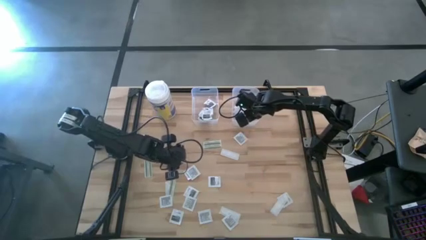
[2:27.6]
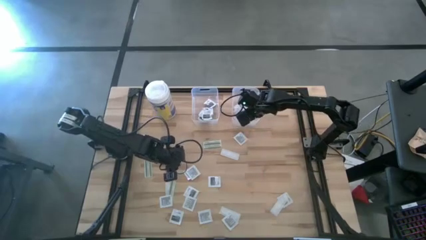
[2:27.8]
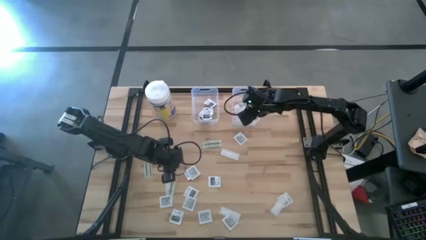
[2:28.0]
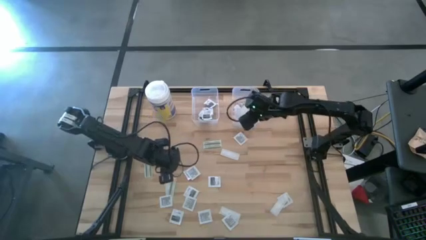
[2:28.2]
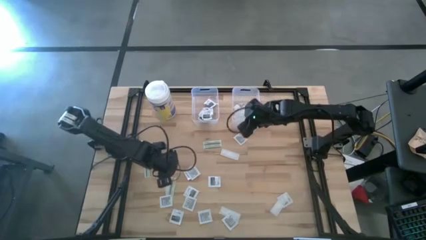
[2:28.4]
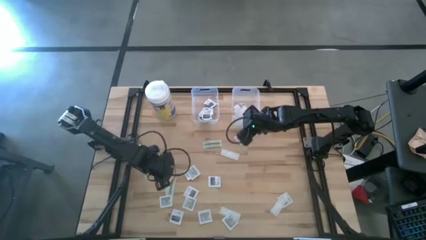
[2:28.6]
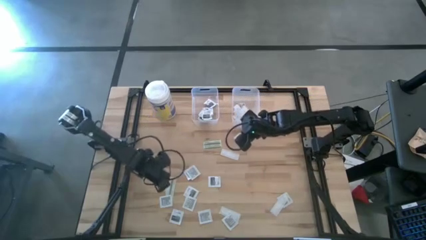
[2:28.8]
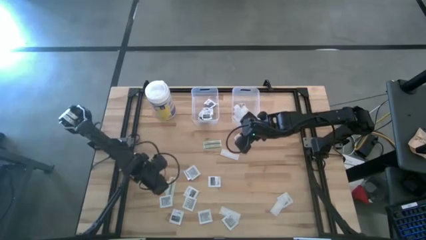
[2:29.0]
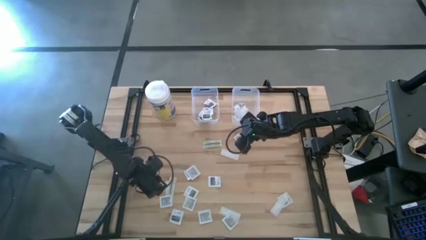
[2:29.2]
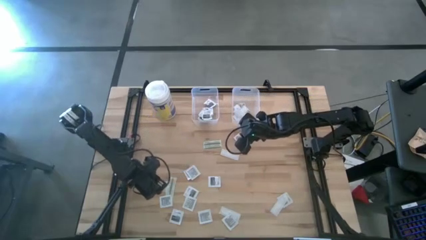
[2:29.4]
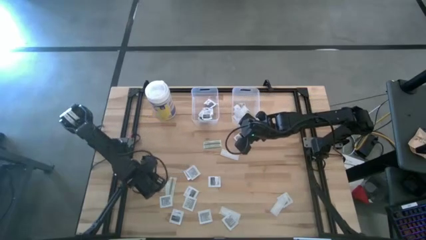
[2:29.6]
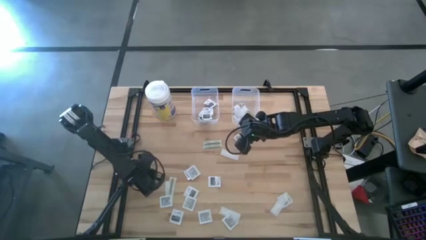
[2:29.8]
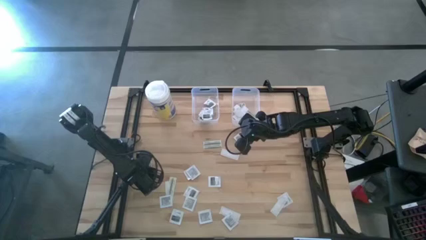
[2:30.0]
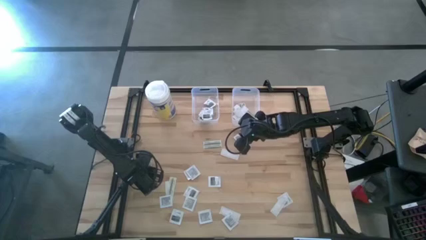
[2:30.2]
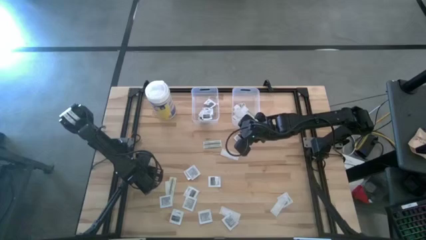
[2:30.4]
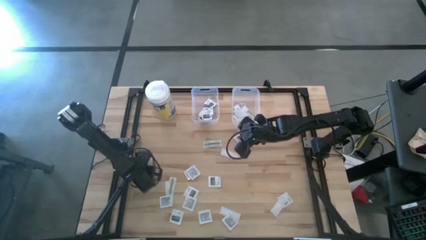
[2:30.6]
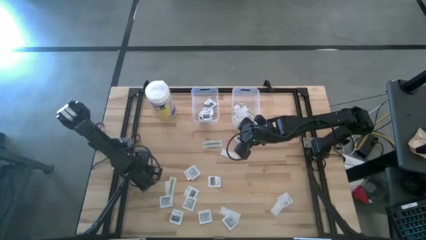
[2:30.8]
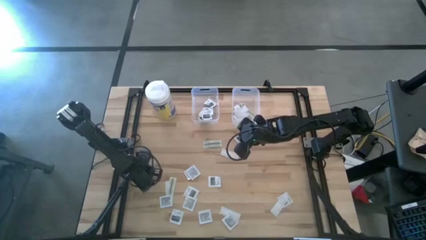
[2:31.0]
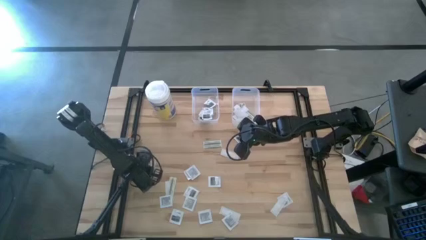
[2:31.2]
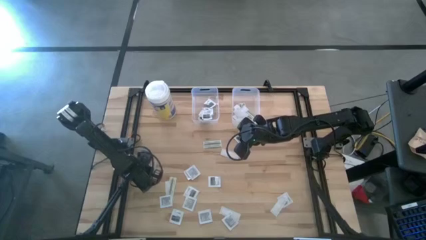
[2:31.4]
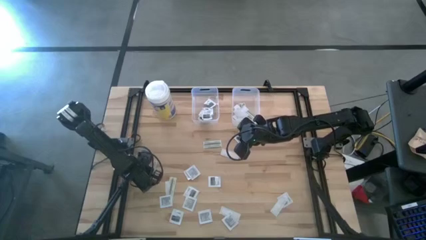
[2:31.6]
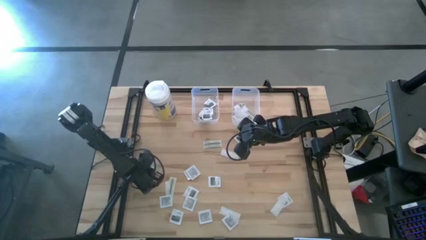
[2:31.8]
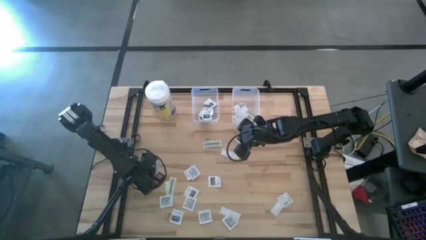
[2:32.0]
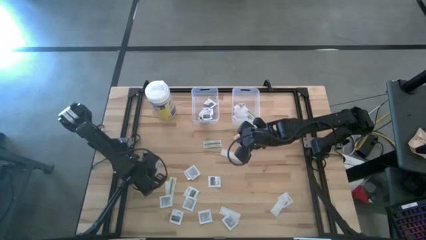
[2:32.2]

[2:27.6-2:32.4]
Task: Pick & Place First Aid Supplies
Put the bandage into the right transparent bin

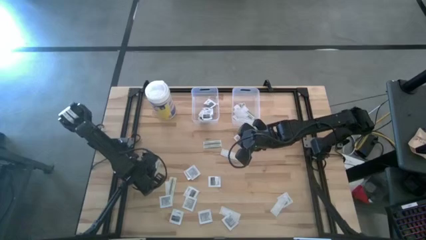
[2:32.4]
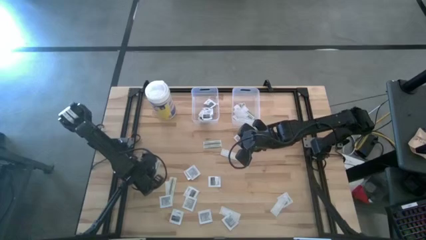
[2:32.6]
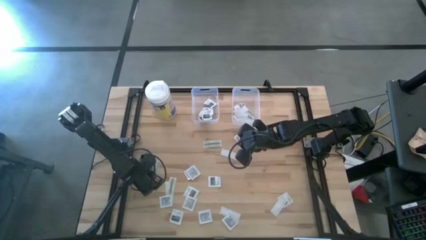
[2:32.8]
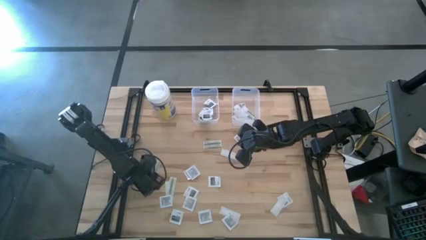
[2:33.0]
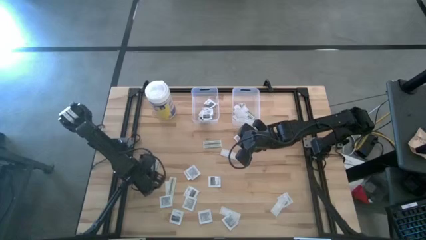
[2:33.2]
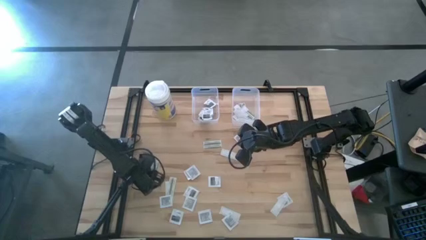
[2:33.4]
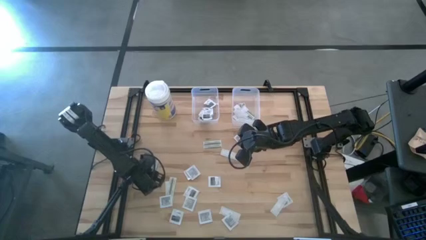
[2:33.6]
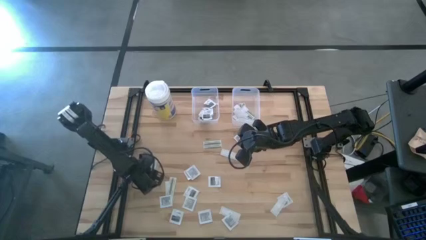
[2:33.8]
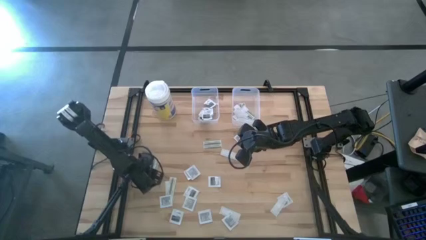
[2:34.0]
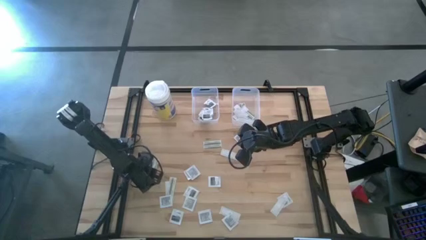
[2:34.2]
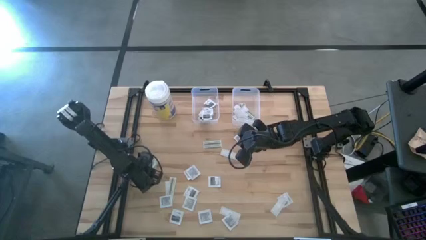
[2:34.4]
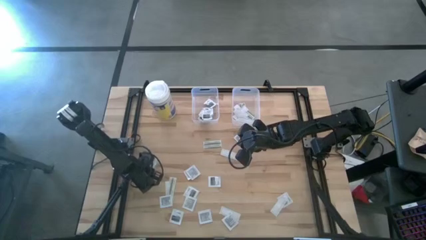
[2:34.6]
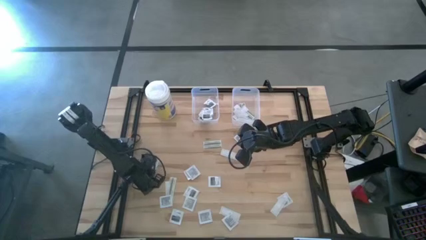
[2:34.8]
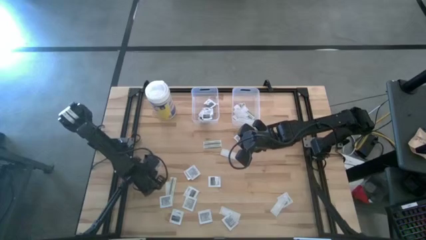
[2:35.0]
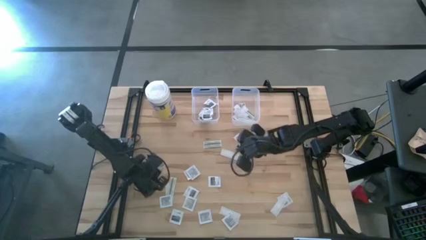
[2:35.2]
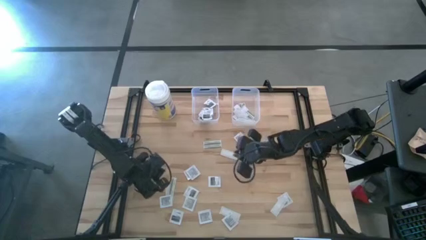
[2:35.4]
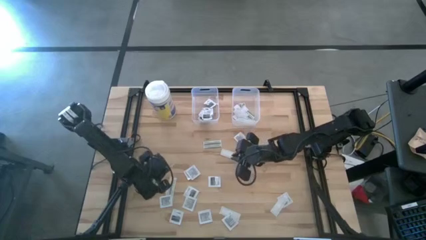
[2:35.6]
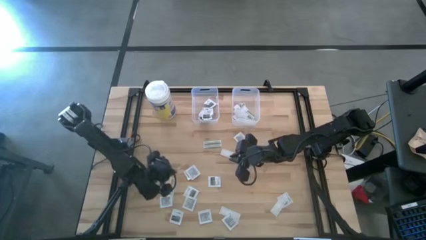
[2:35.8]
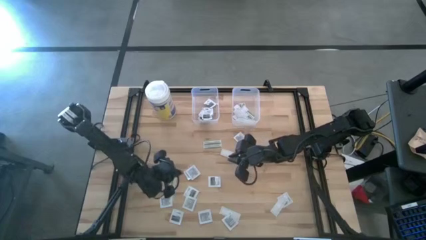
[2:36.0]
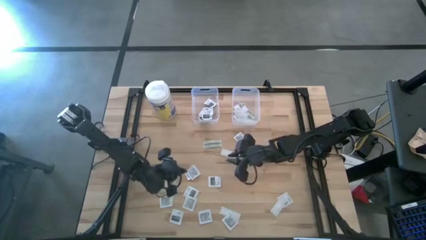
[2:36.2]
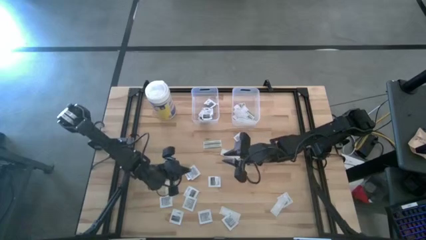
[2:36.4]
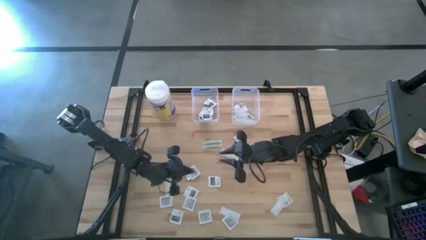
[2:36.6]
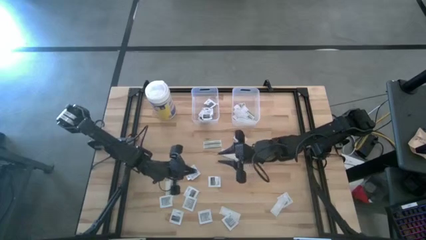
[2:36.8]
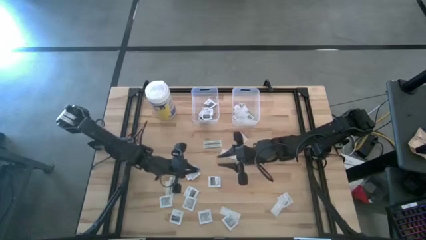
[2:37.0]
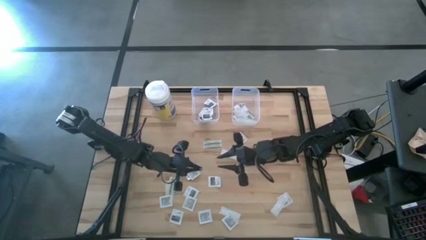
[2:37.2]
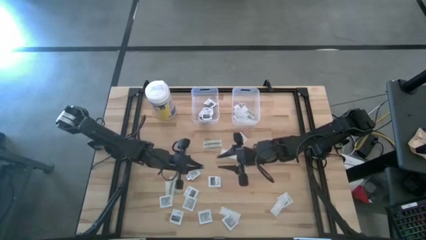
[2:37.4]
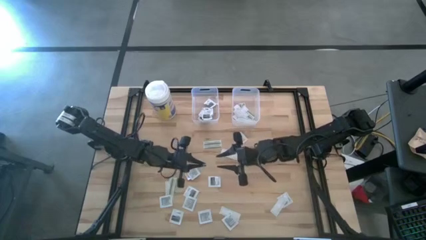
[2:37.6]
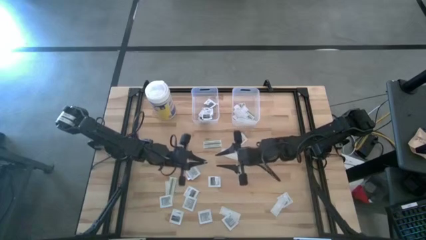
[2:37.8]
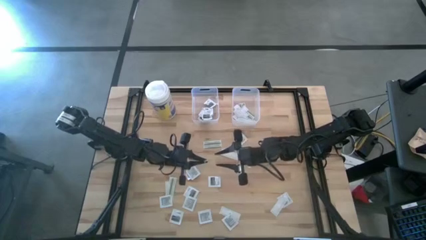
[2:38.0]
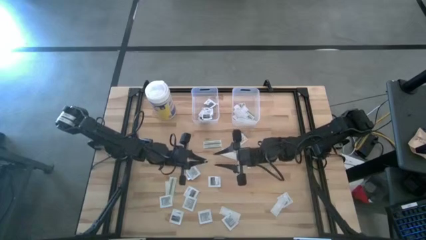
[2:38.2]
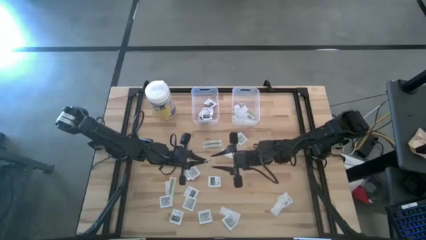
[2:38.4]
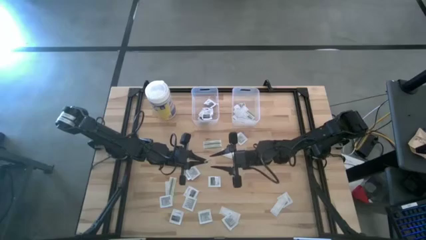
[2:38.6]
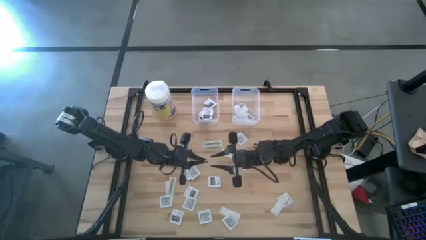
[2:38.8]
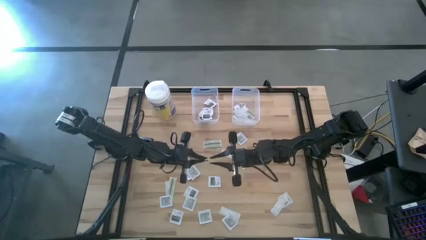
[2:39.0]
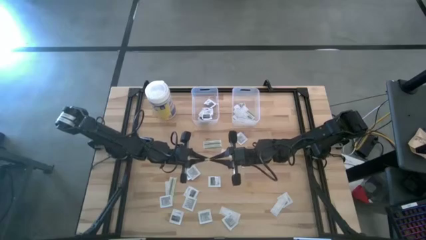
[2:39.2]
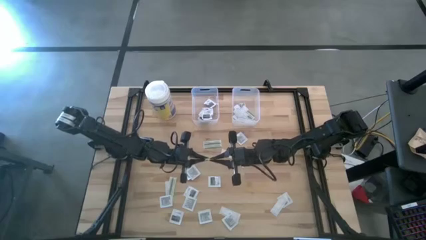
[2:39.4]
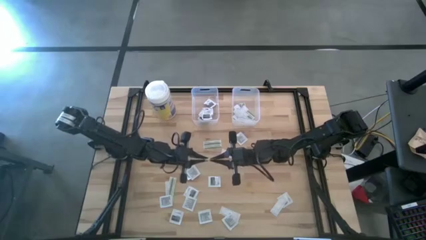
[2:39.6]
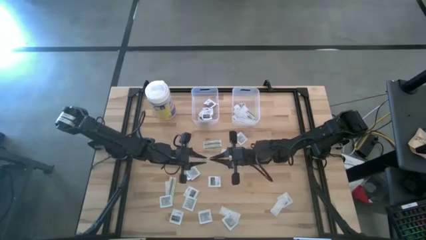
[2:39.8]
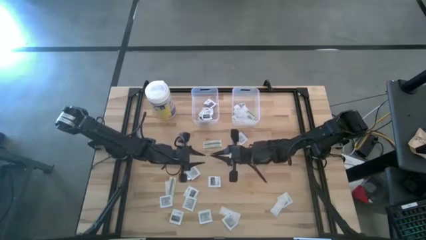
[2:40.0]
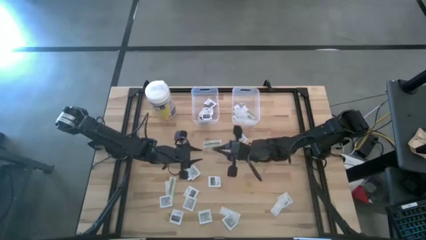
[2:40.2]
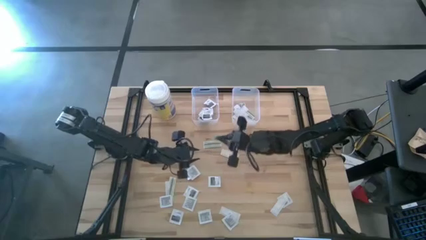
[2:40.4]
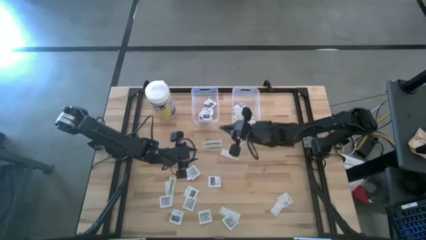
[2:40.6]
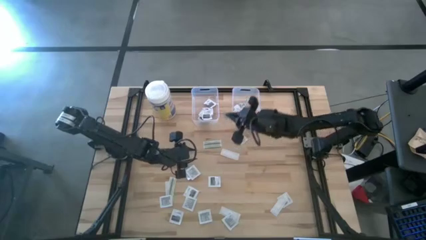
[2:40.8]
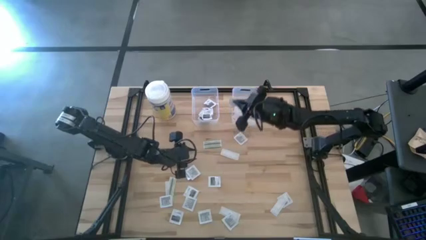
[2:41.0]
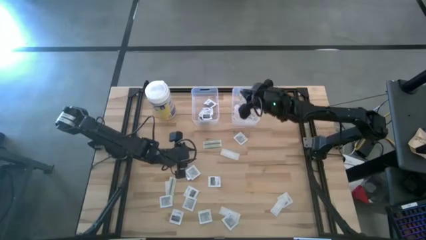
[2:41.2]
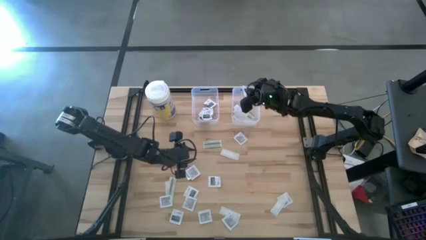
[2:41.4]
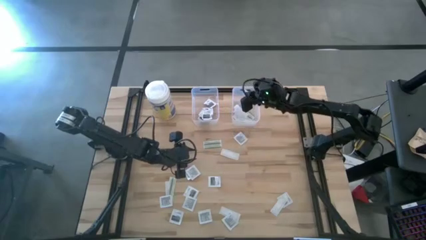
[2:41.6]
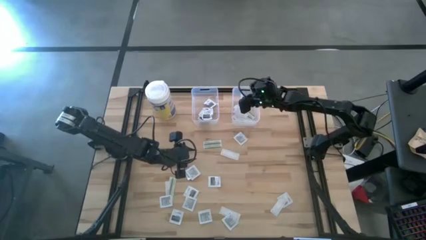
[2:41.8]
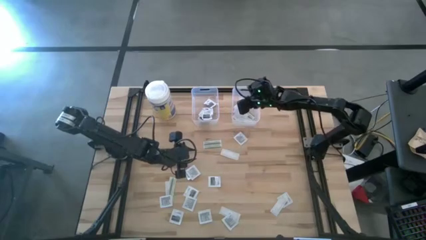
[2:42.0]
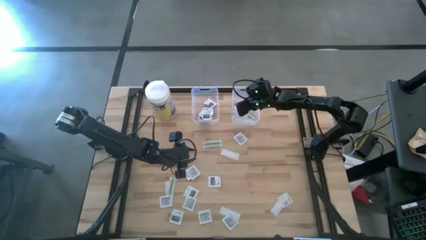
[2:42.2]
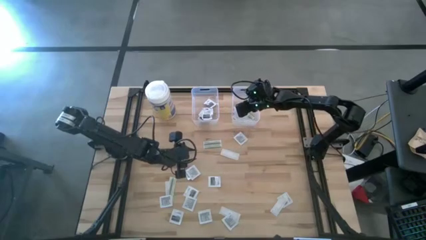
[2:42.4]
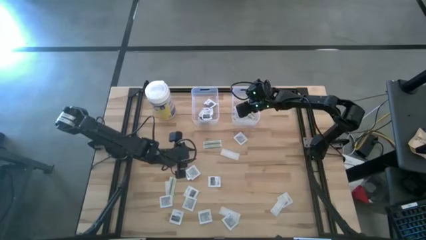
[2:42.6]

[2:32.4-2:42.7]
Put the bandage into the right transparent bin
